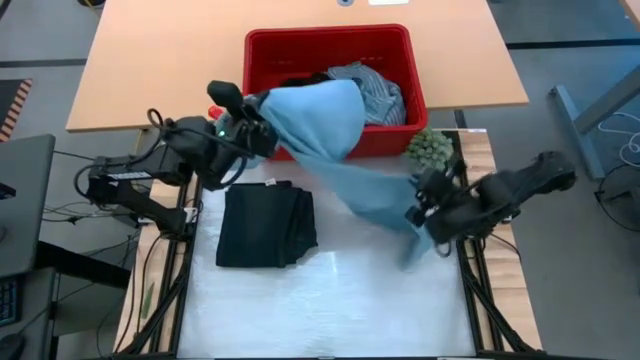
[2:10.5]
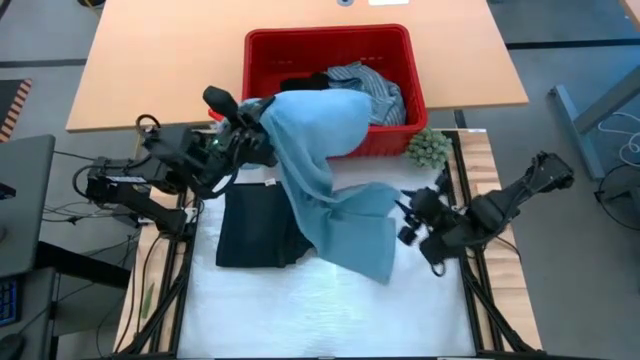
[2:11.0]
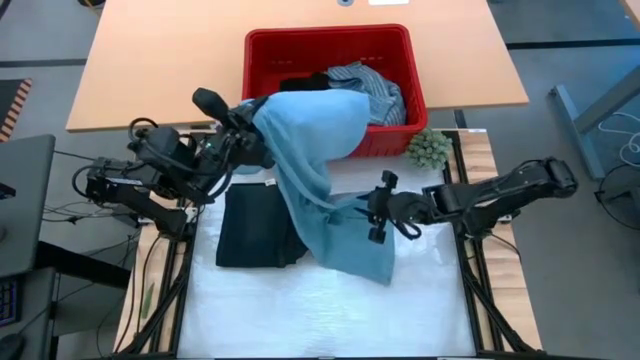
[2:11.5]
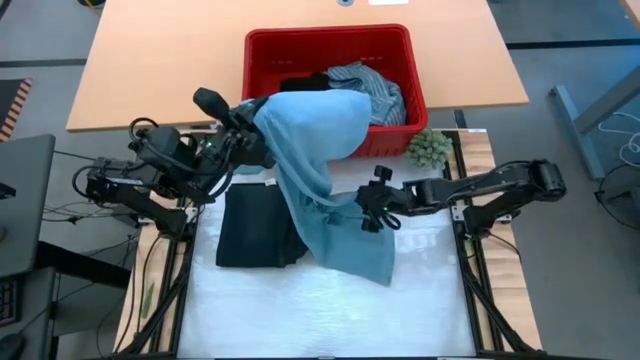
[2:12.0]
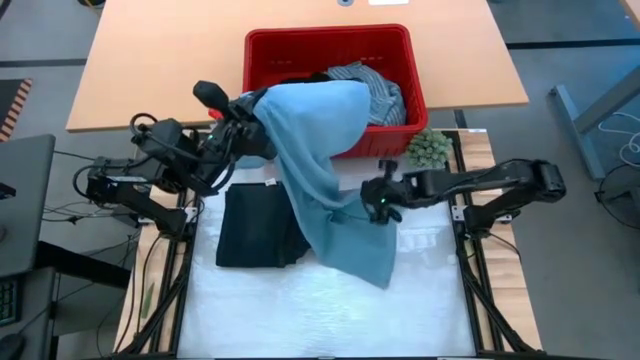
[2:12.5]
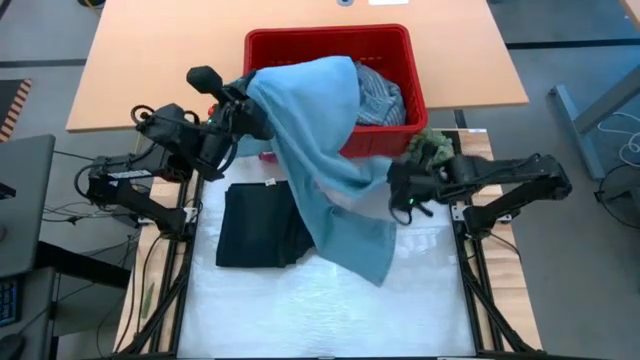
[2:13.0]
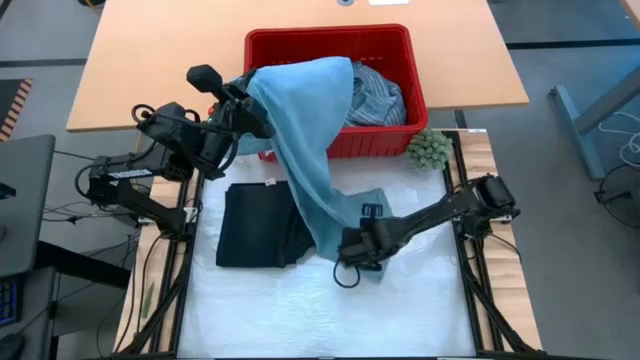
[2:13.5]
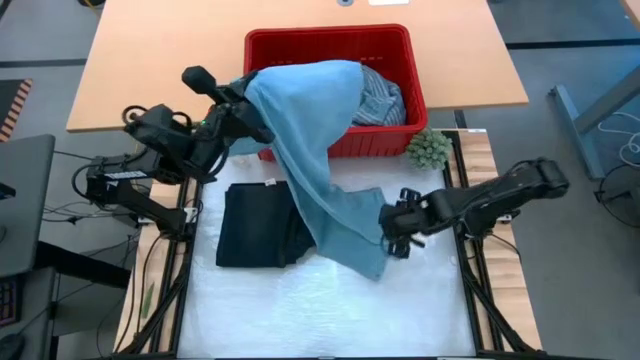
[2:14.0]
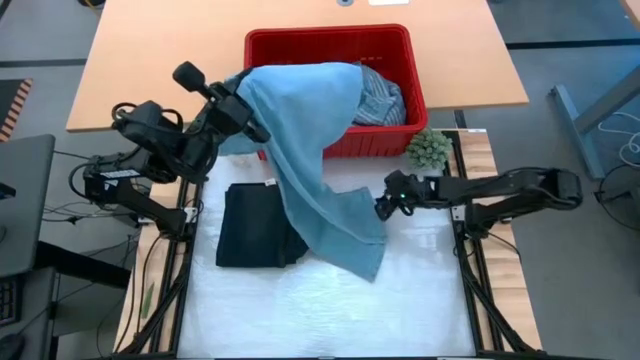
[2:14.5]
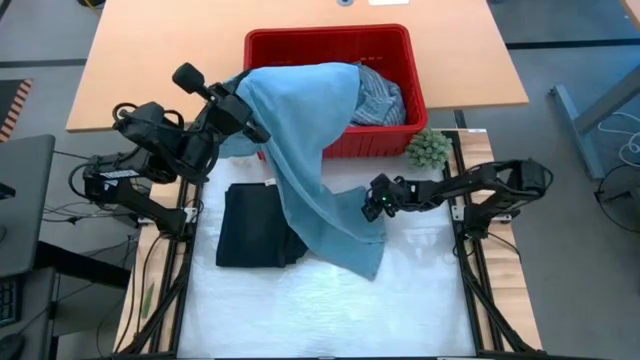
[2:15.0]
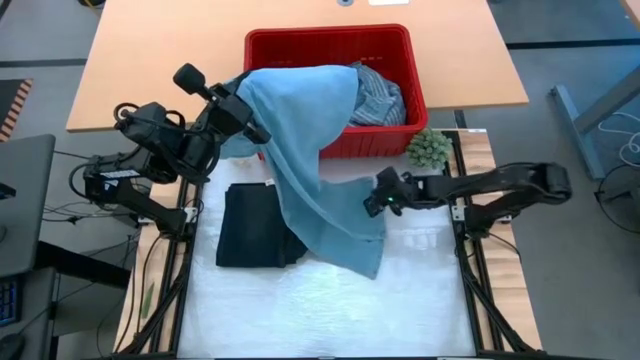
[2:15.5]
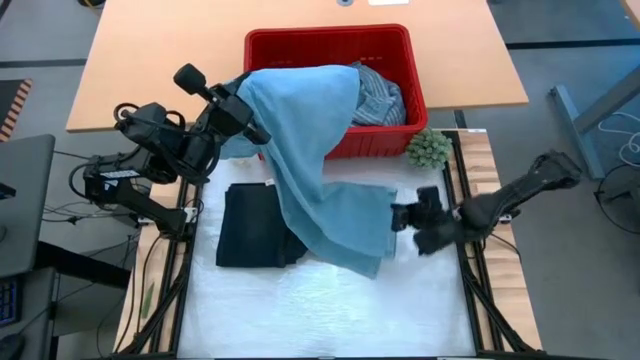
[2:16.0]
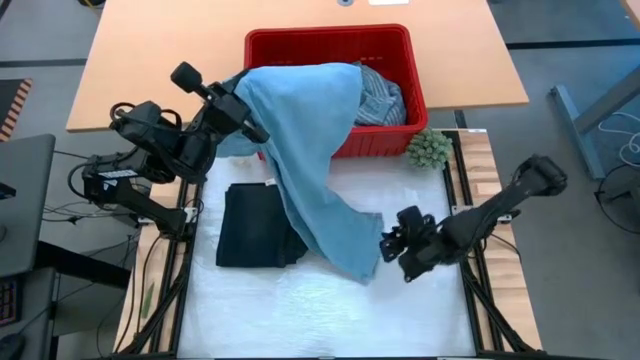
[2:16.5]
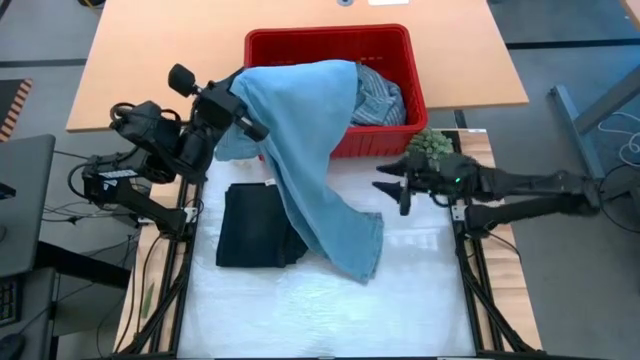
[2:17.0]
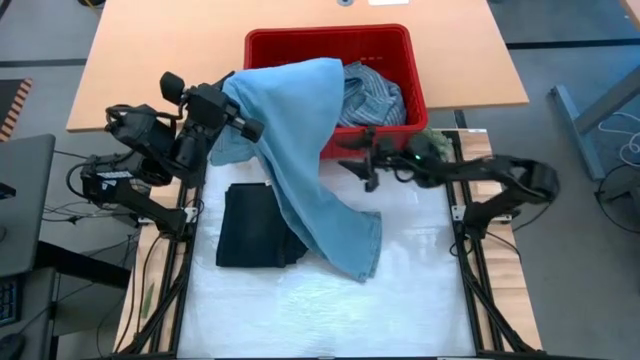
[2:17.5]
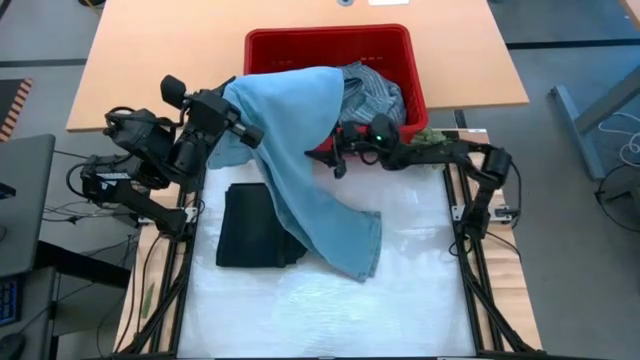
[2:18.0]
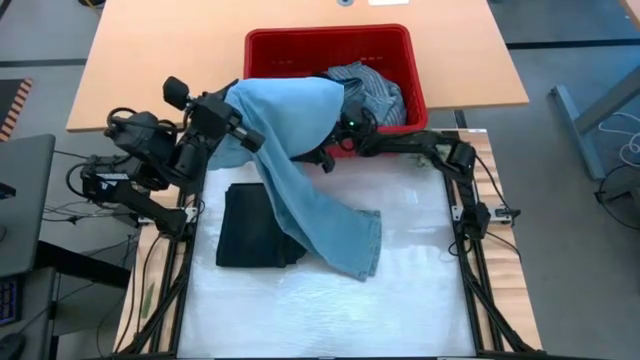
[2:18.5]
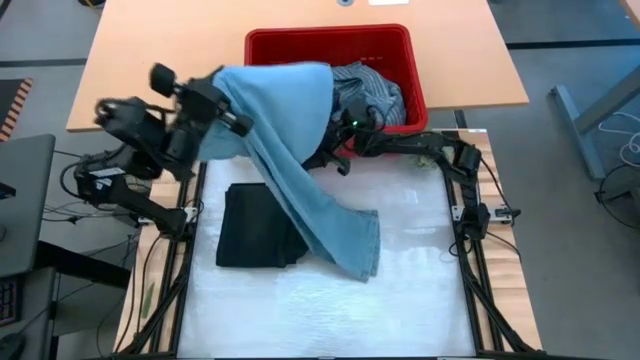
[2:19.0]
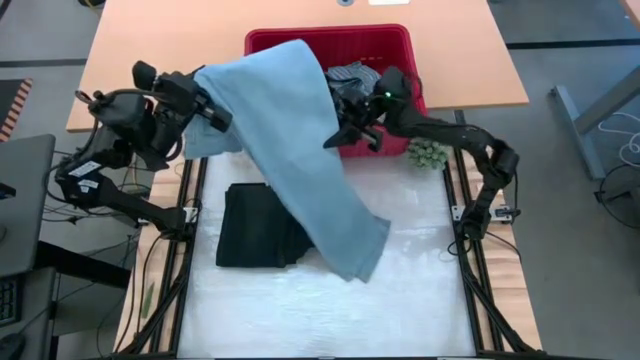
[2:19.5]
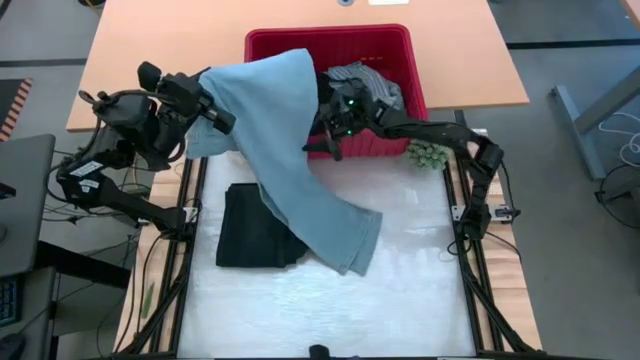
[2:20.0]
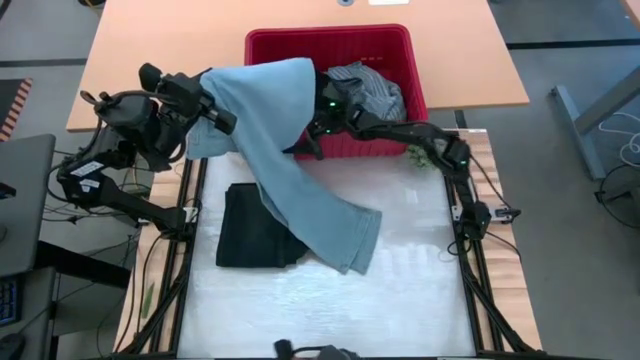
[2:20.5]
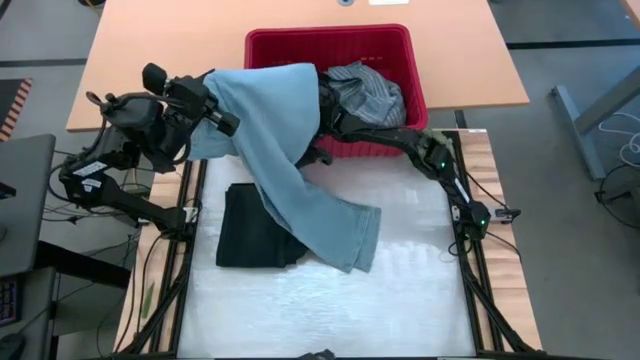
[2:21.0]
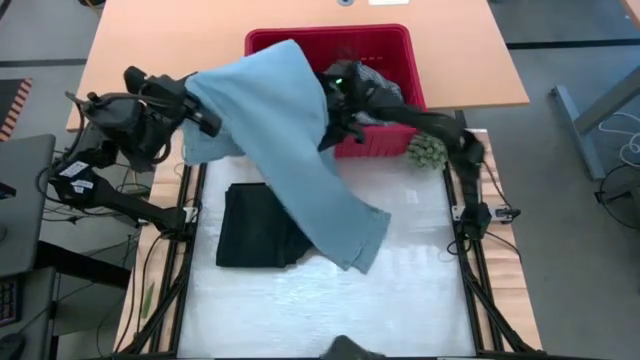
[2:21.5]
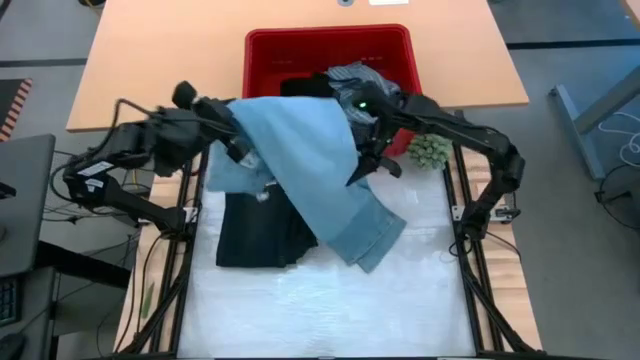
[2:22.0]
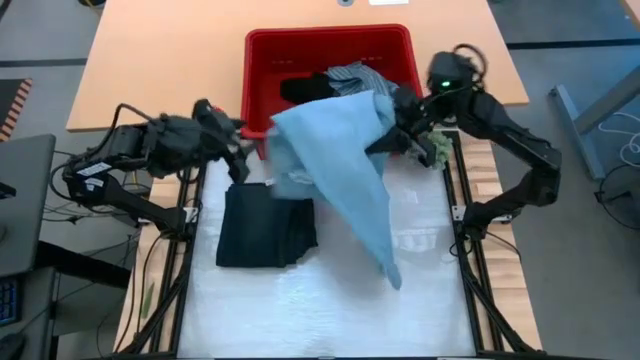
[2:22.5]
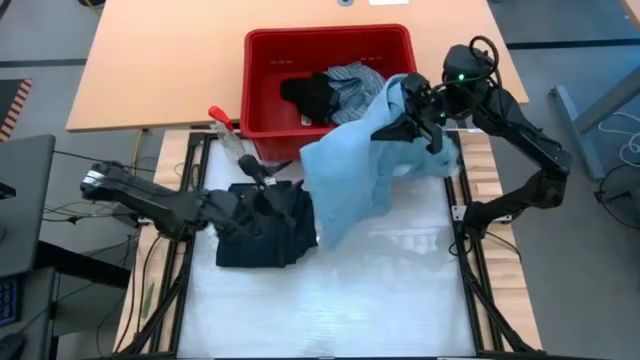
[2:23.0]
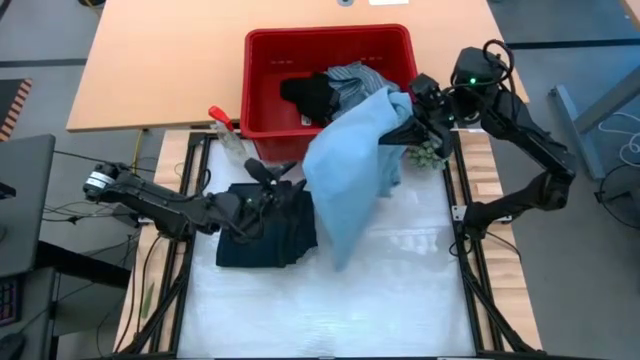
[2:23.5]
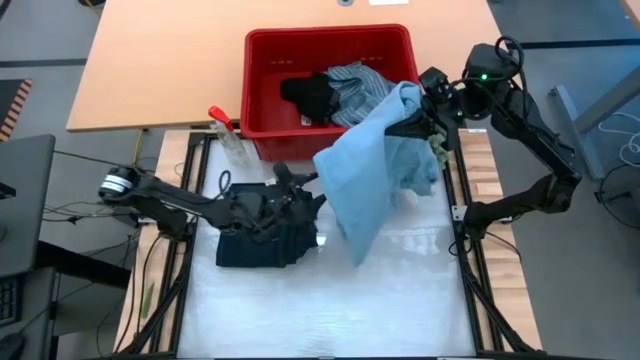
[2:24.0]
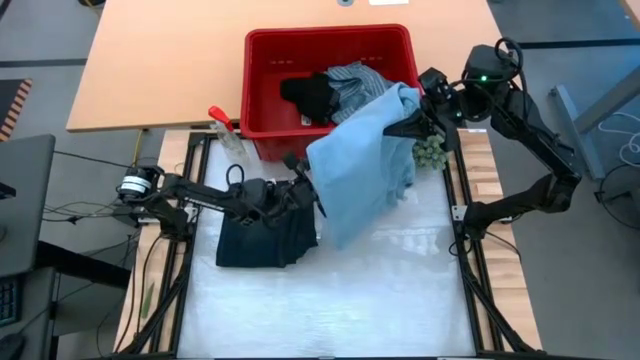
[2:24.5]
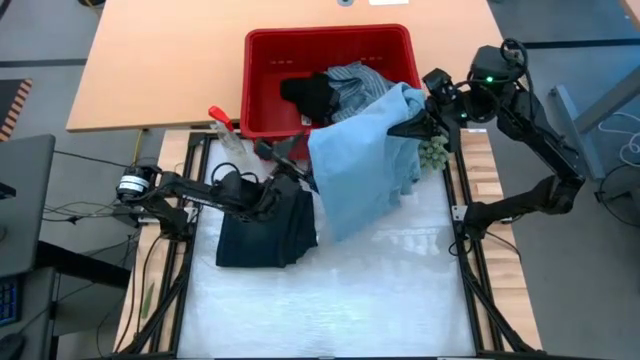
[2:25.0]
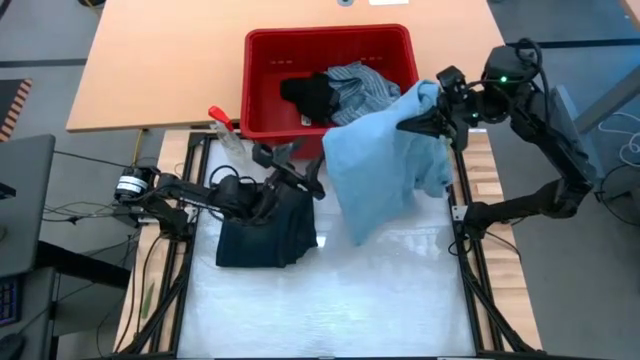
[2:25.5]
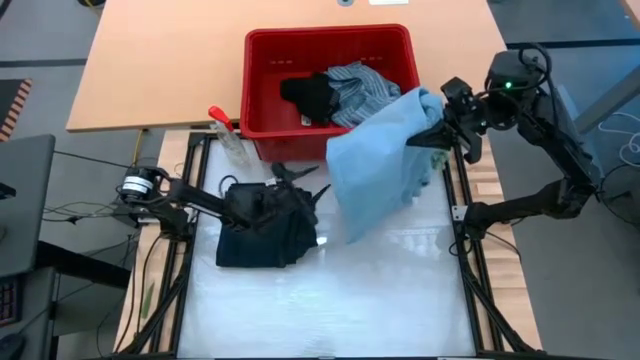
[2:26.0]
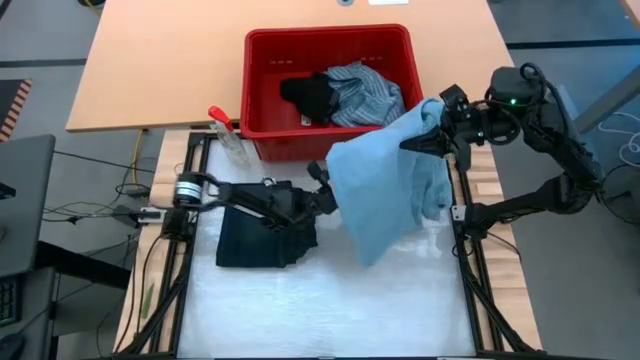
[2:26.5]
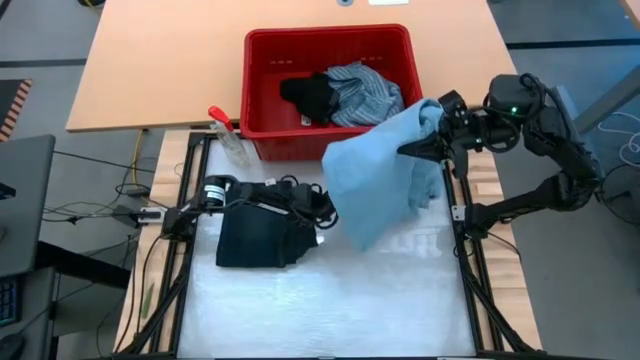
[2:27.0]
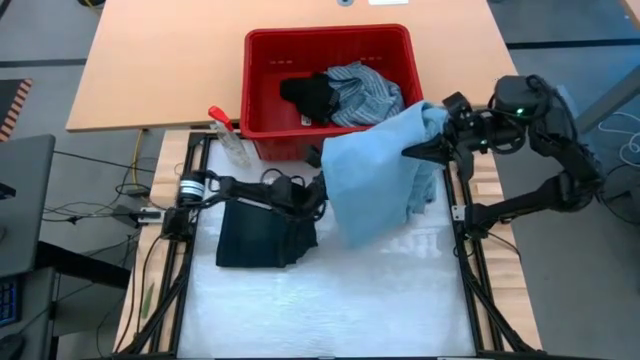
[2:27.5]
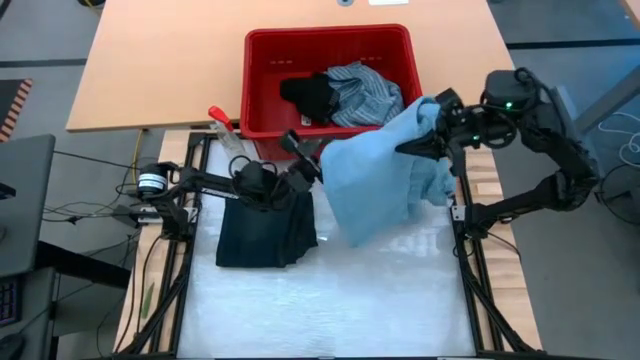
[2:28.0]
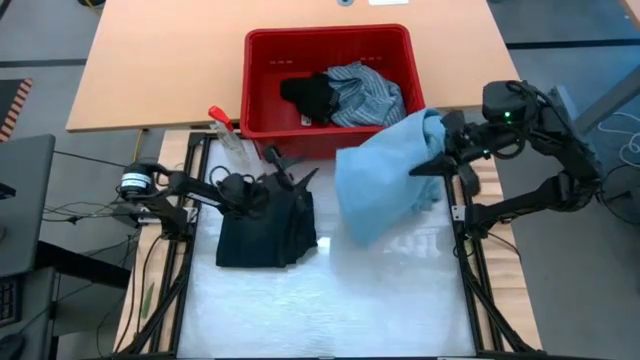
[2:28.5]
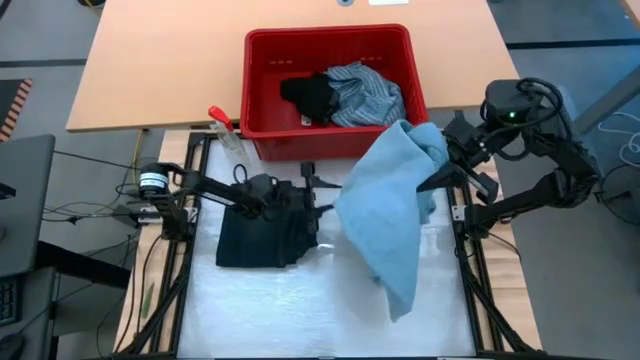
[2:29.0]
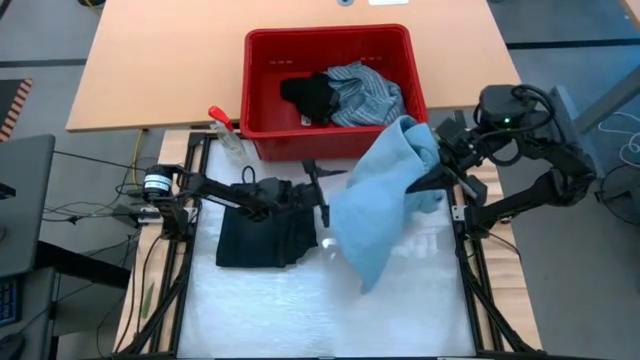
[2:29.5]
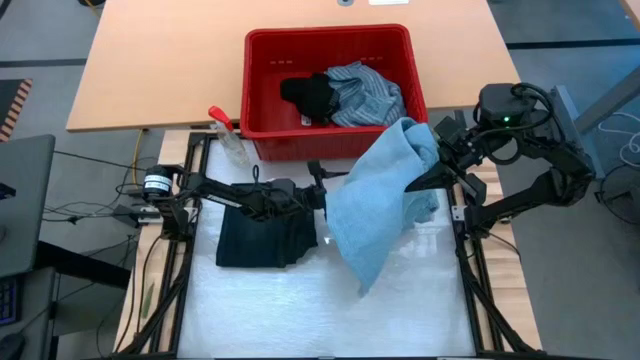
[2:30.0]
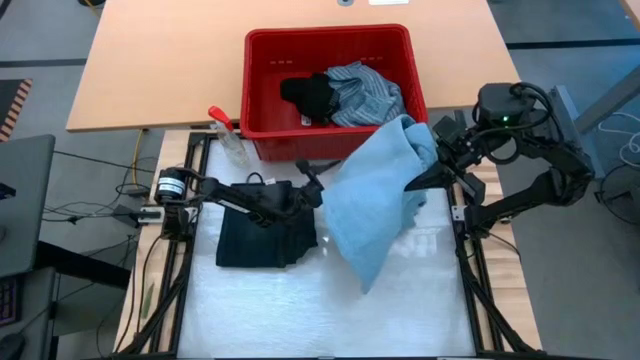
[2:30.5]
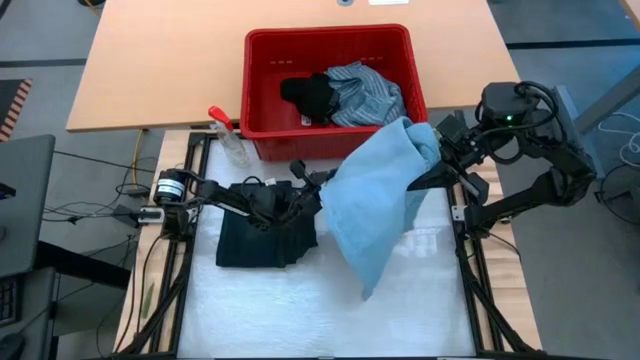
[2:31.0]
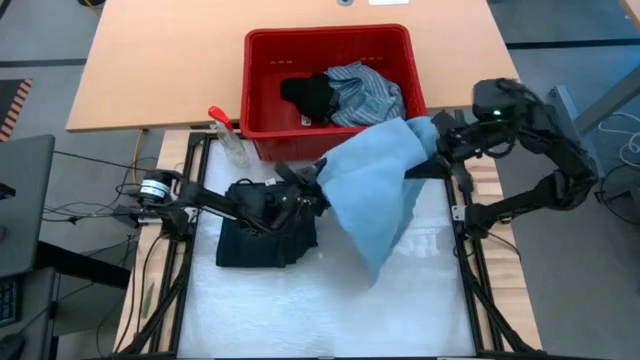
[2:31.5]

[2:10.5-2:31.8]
Task: Fold Laundry from Bin
Fold the light blue pants
